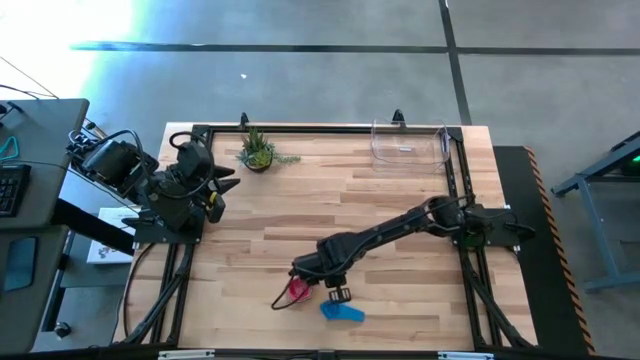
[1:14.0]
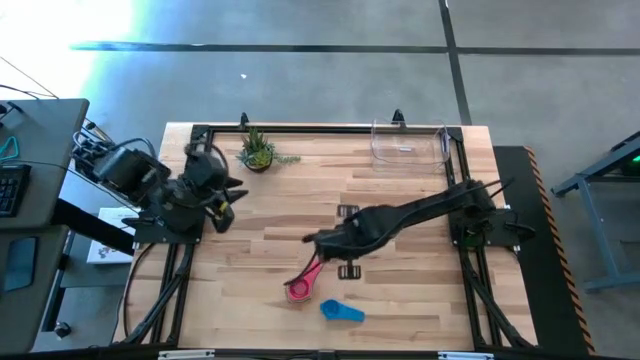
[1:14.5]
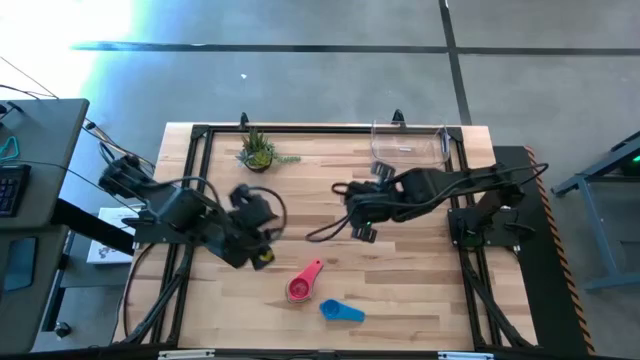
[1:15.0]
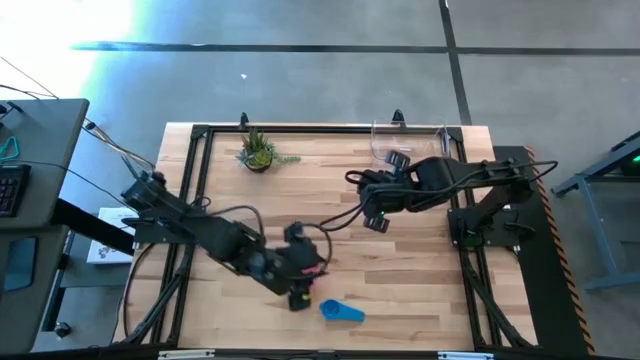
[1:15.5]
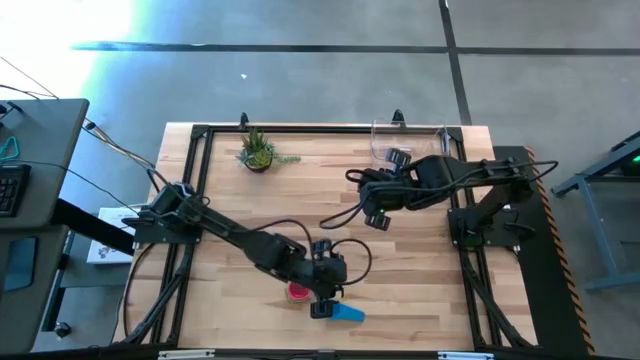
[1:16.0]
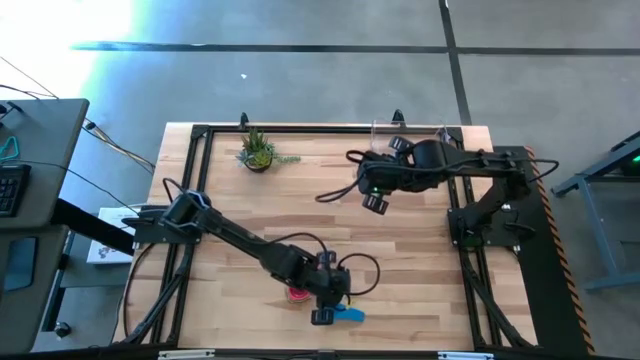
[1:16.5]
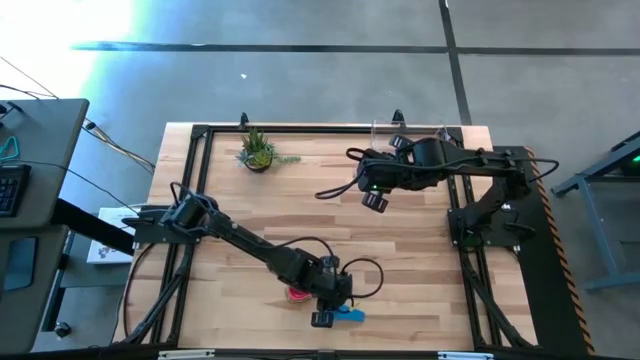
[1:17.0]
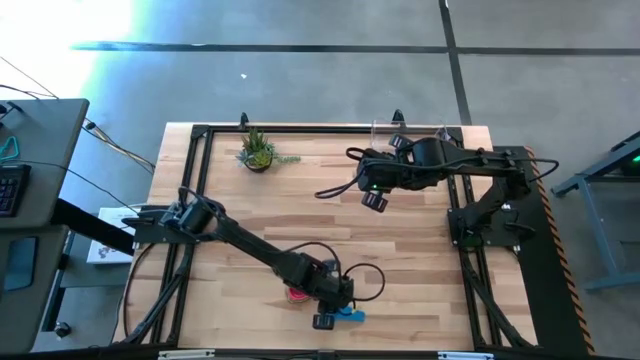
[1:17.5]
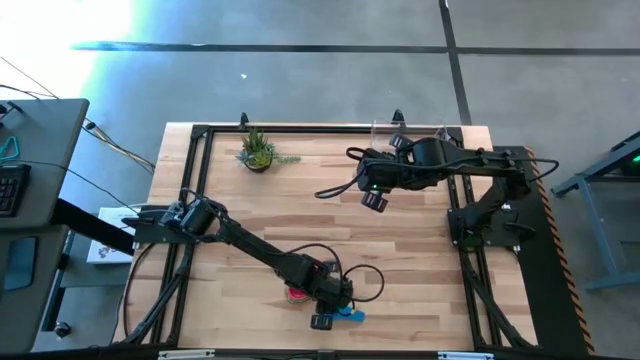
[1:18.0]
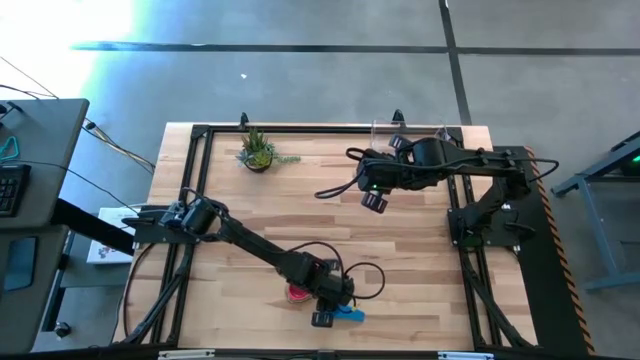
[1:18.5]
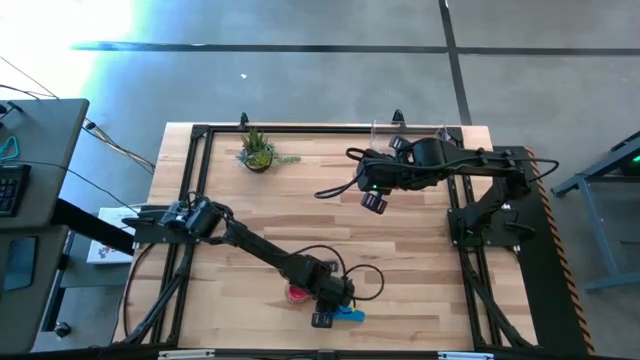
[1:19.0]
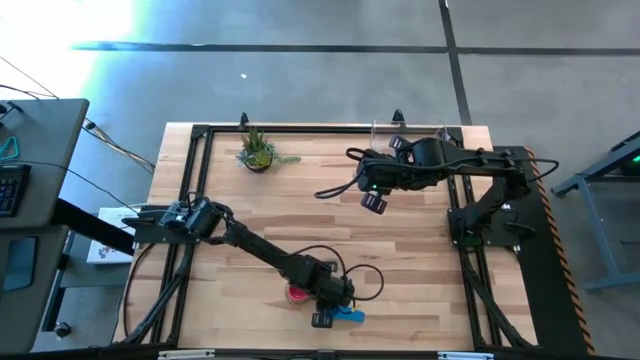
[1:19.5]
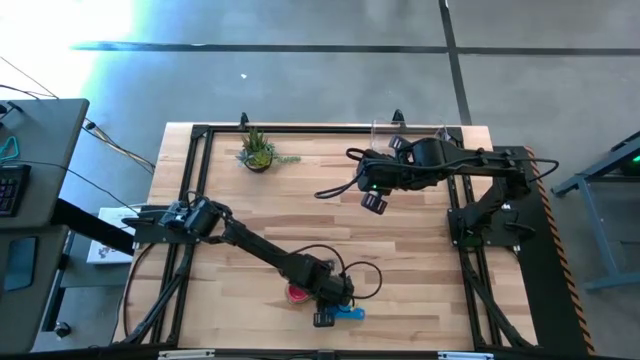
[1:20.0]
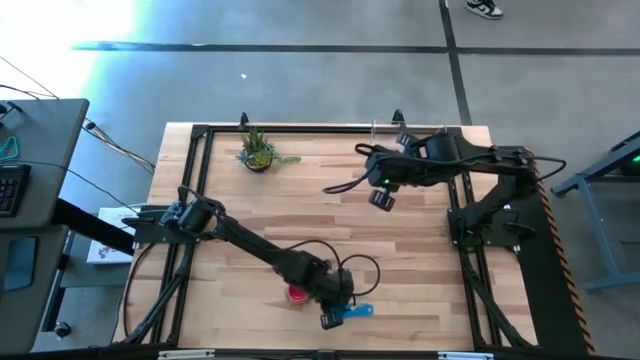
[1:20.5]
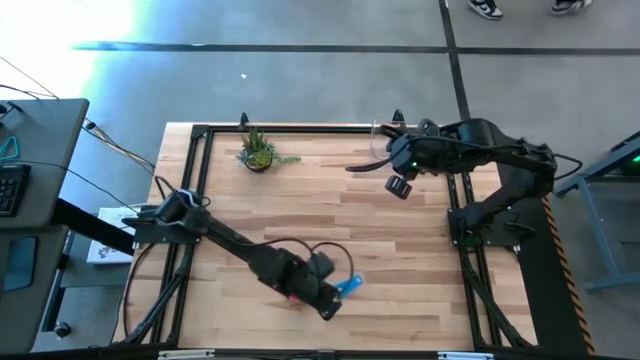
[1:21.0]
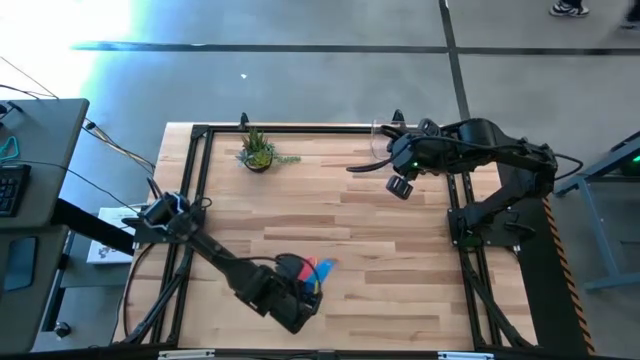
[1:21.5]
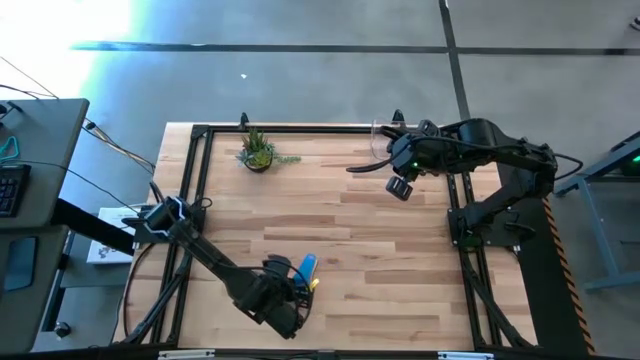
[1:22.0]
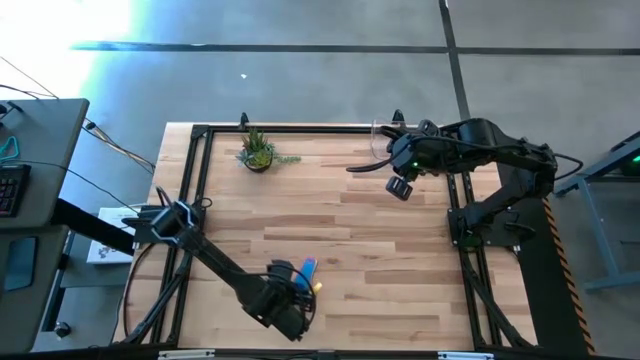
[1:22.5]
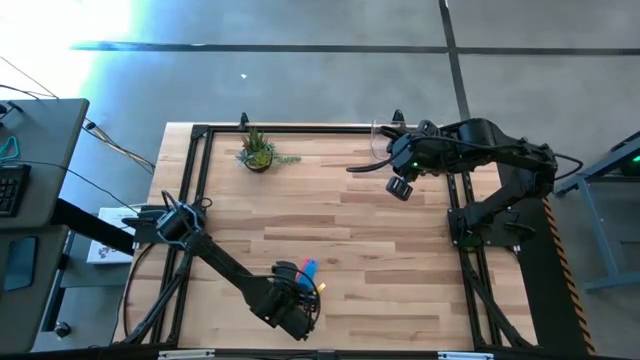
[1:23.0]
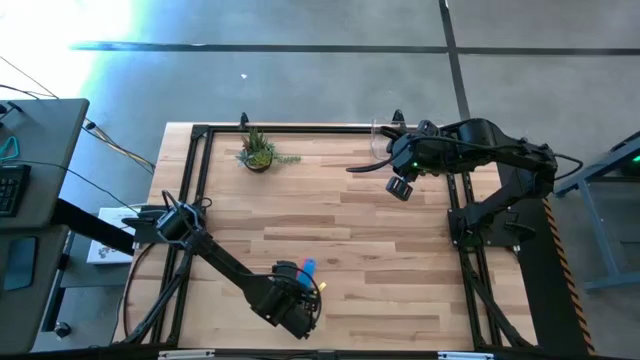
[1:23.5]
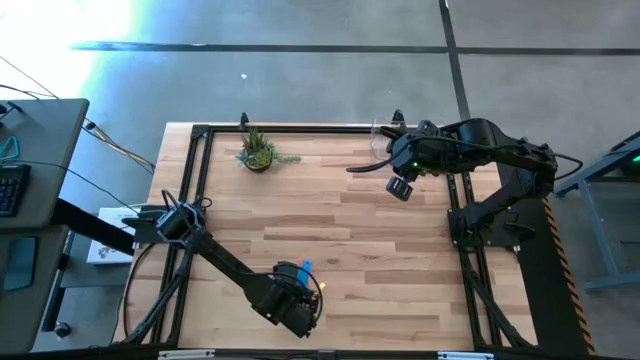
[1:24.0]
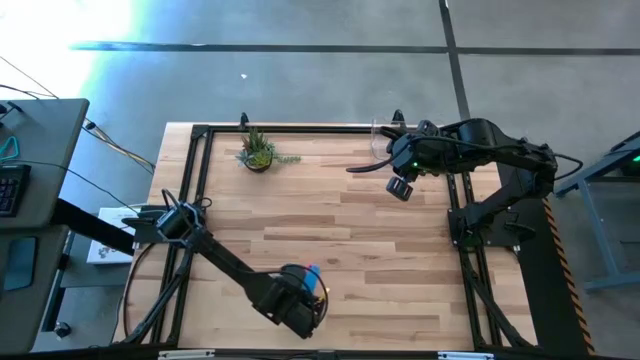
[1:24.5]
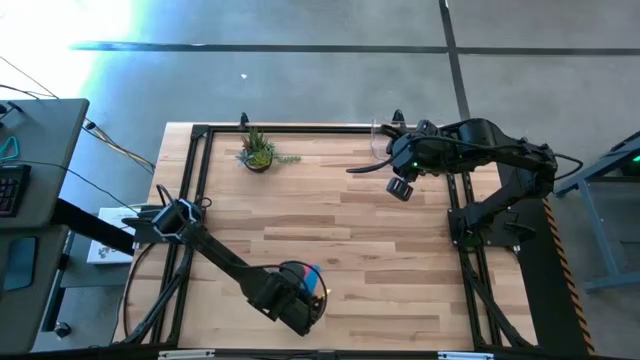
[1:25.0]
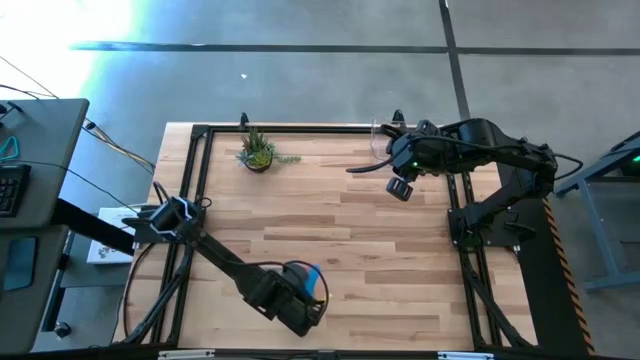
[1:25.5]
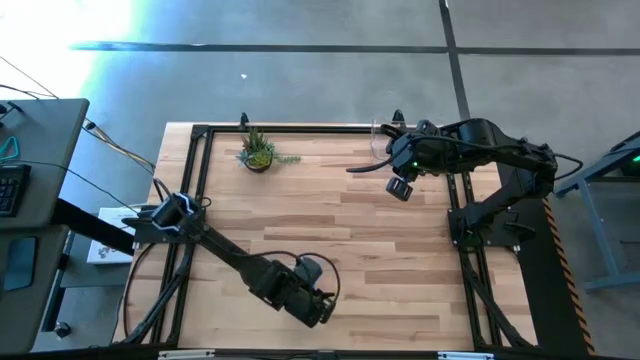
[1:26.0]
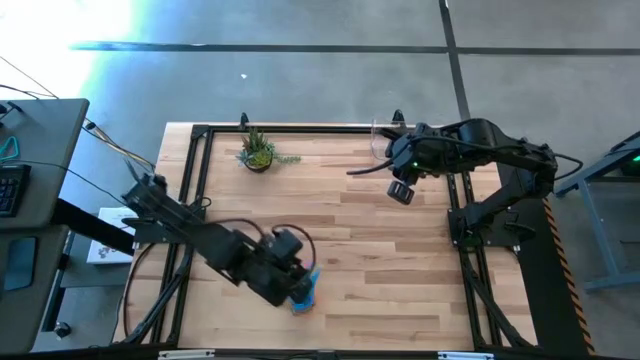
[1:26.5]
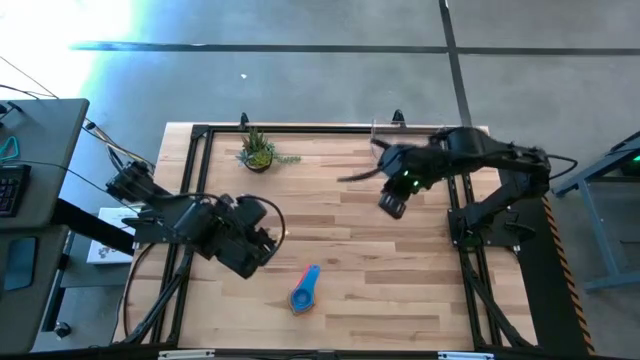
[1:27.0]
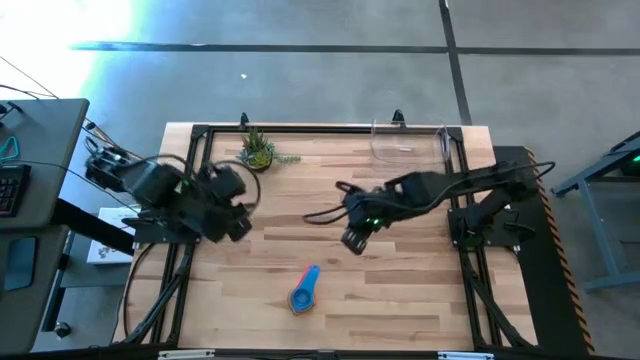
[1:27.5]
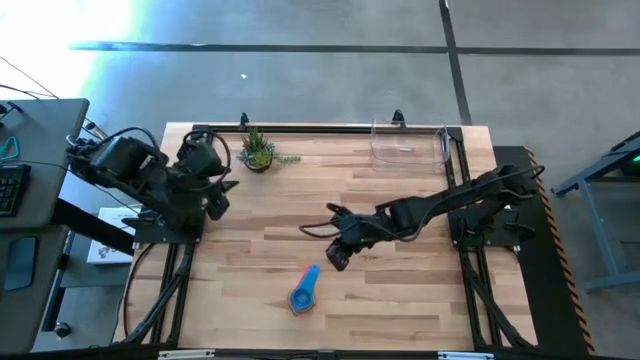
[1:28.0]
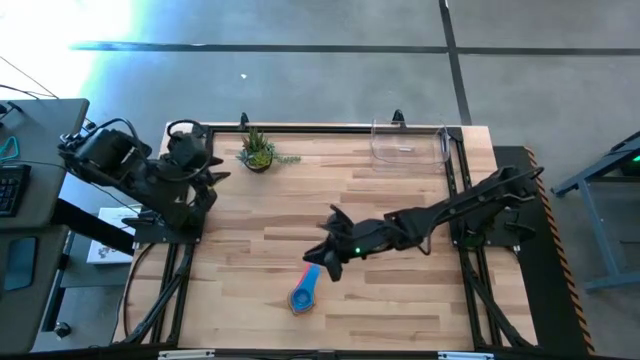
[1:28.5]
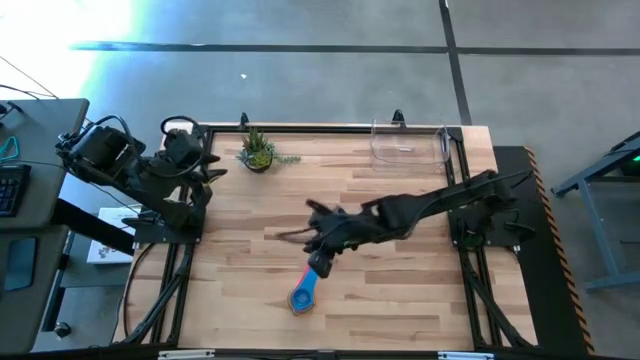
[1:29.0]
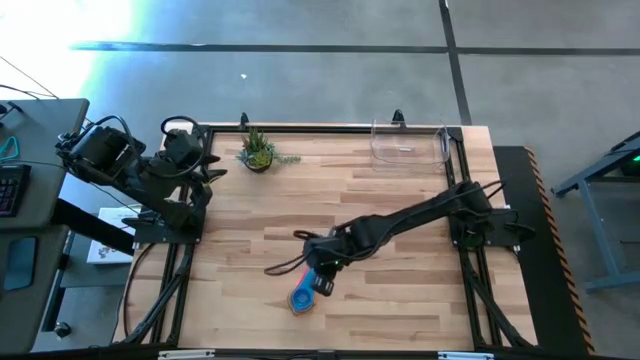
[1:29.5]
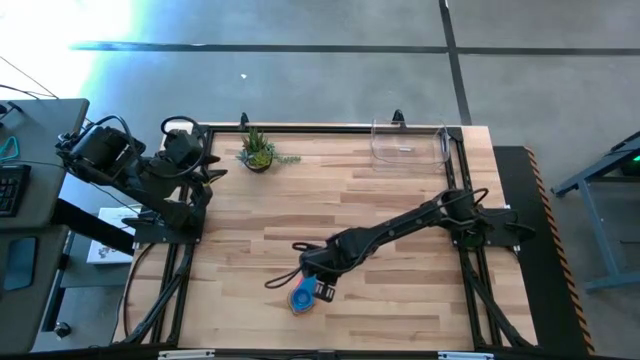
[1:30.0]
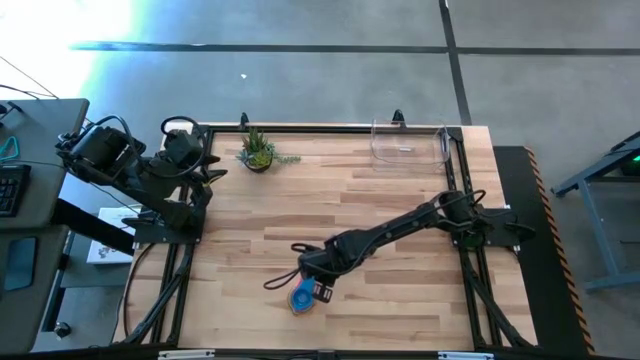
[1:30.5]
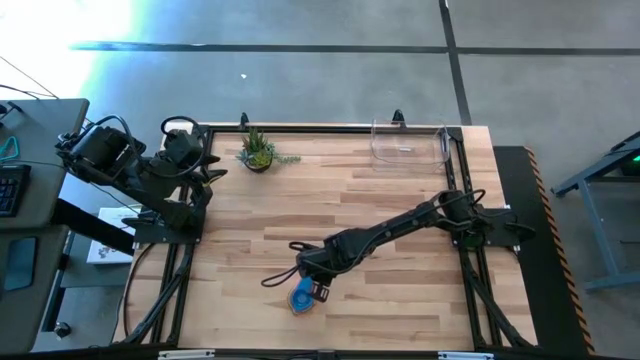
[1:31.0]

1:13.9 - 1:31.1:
Task: Nest measuring cups in basket
Stack the blue measuring cup on top of the red measuring cup

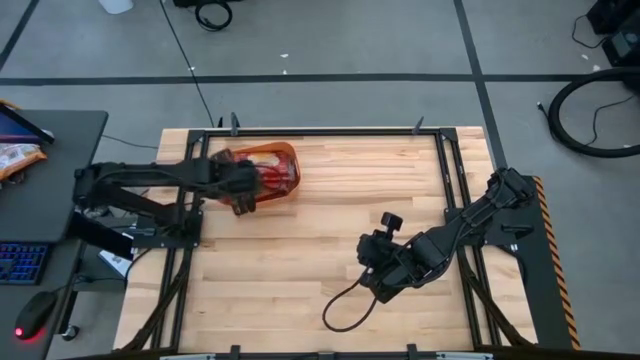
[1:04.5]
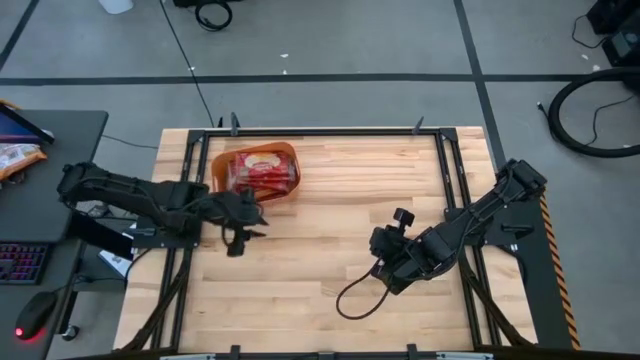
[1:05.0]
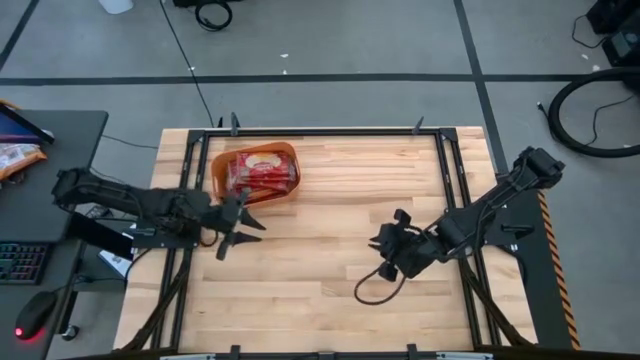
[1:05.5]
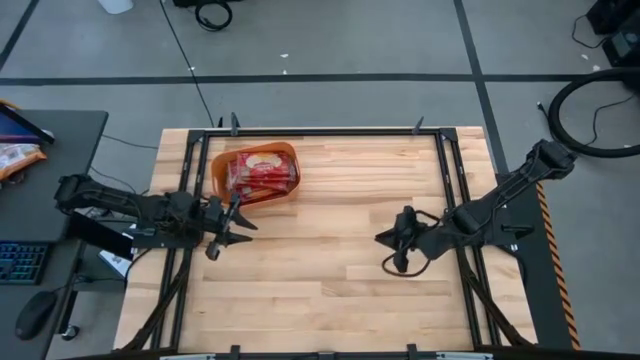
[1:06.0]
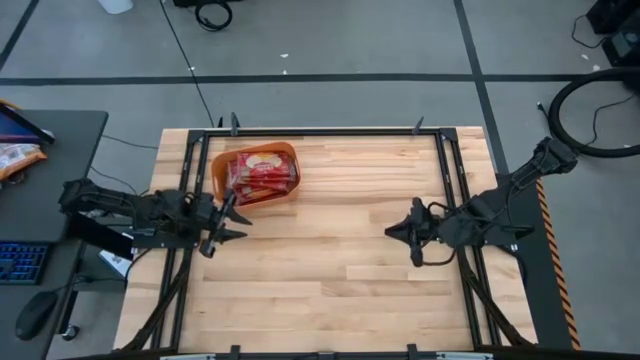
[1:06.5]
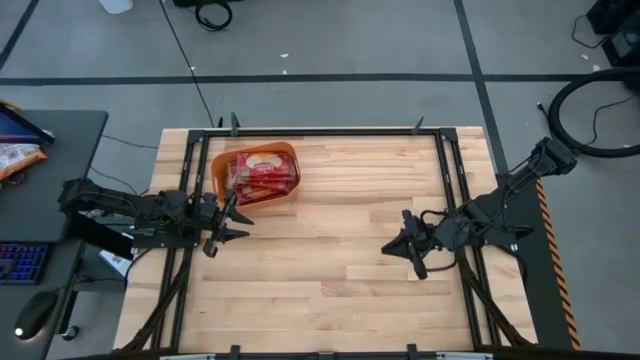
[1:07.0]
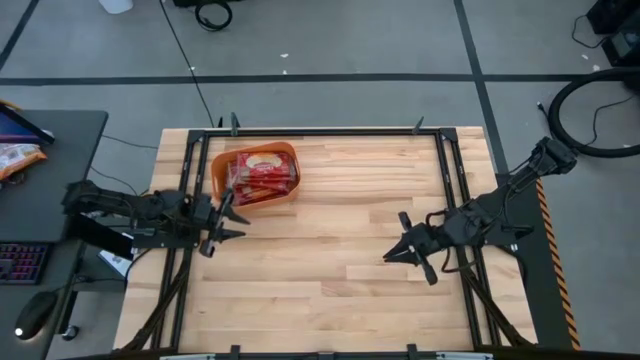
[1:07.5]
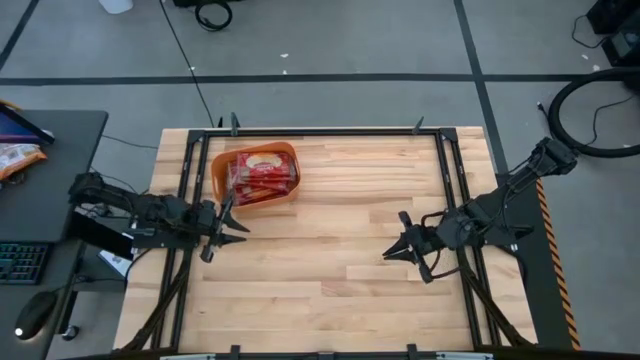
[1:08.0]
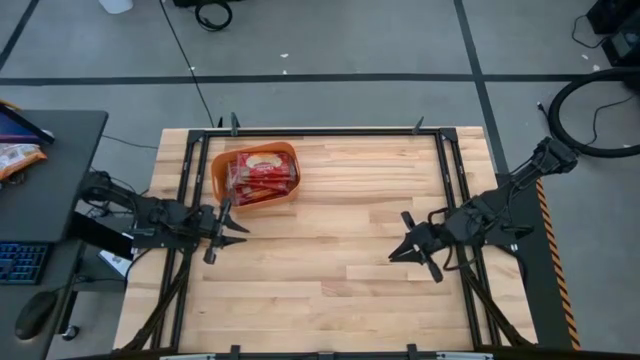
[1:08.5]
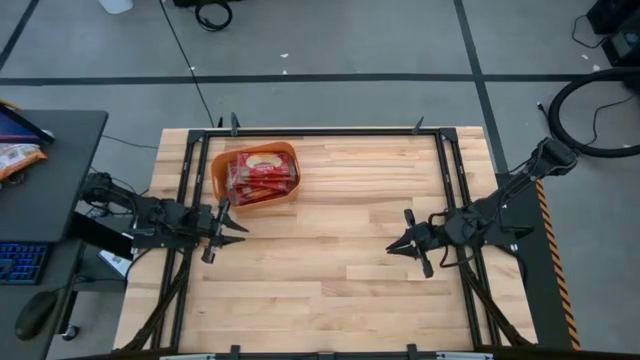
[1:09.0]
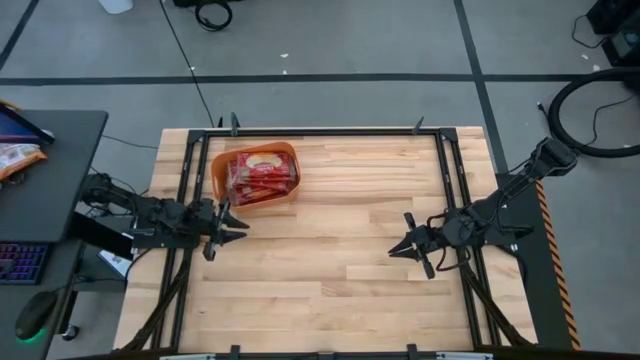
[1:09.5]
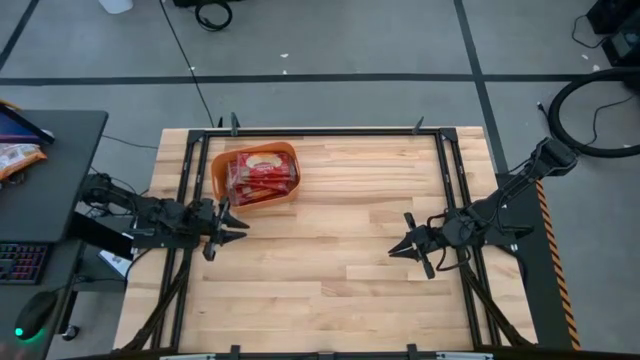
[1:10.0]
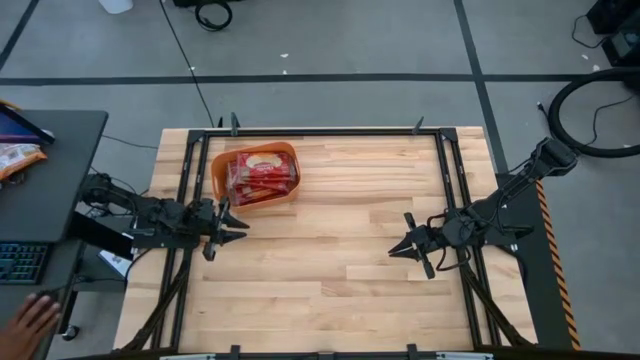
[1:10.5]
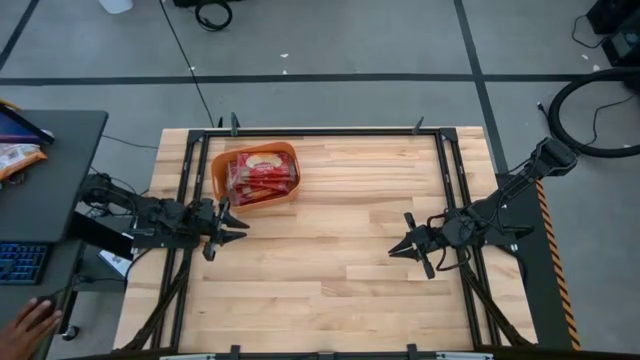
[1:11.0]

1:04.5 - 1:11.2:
Task: Sort popcorn bags into baskets
Return to Home Position
